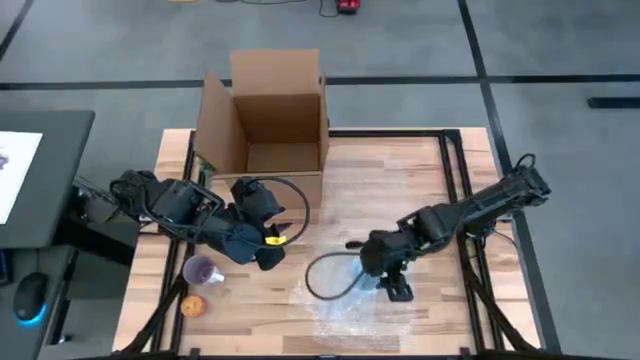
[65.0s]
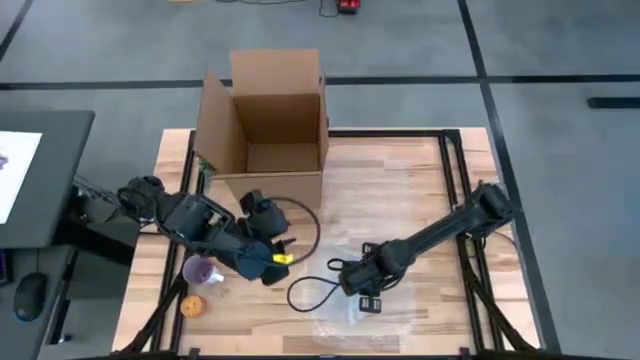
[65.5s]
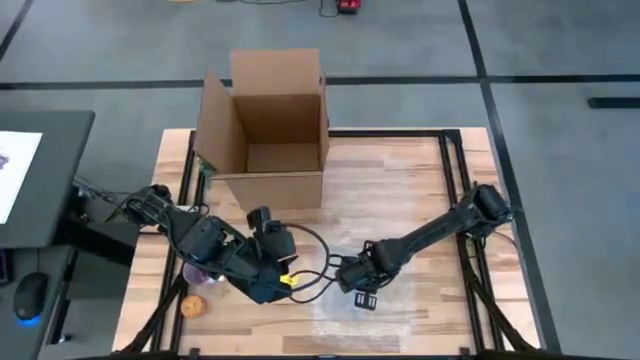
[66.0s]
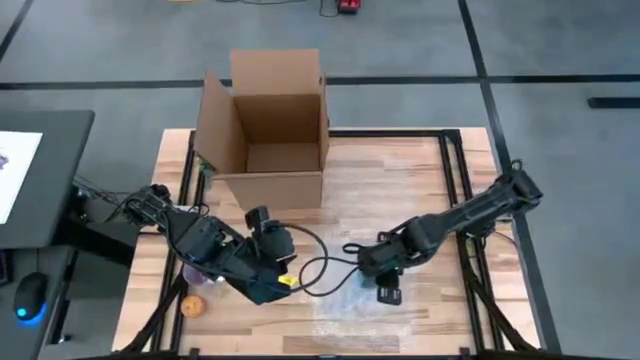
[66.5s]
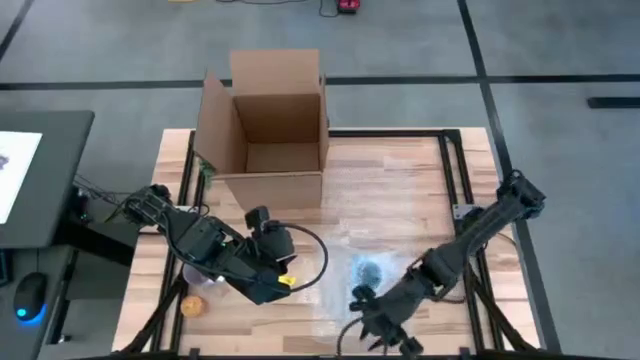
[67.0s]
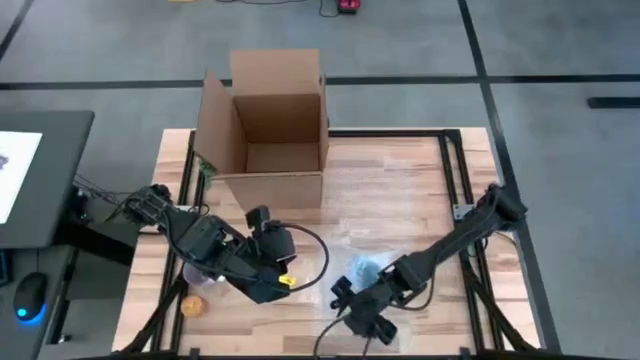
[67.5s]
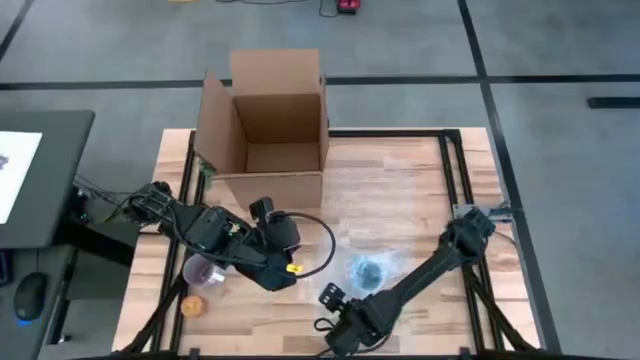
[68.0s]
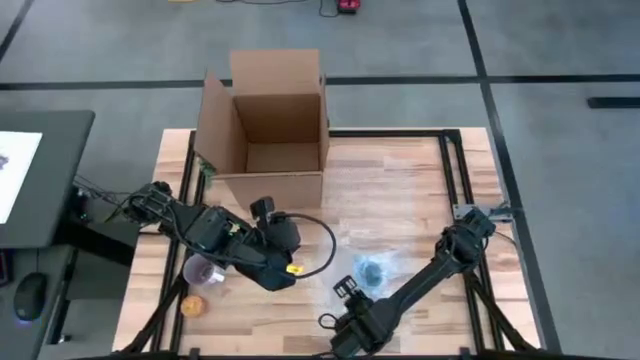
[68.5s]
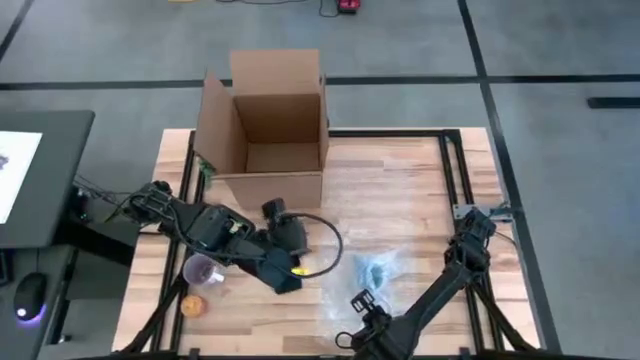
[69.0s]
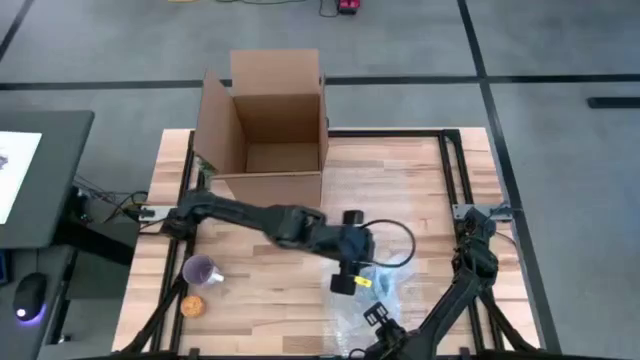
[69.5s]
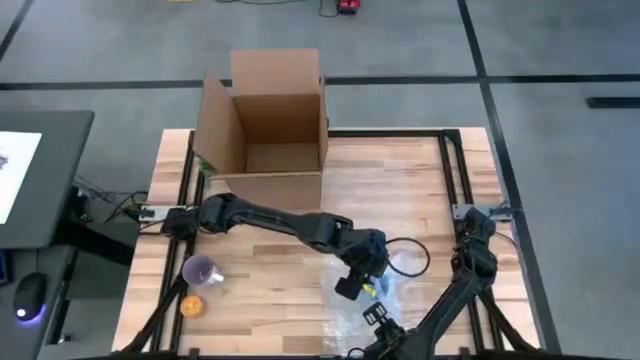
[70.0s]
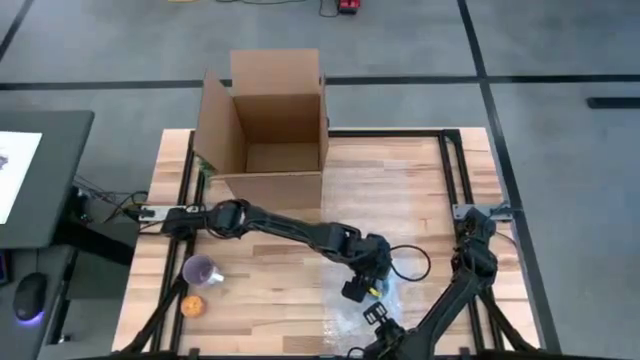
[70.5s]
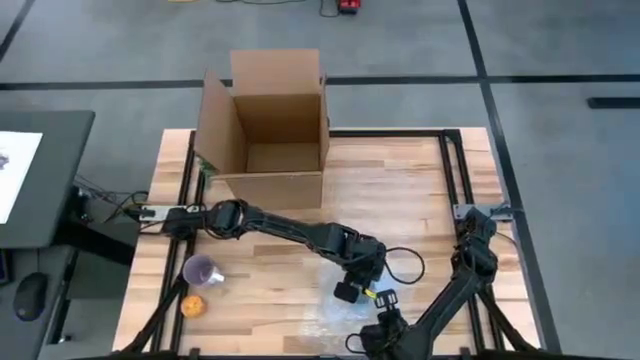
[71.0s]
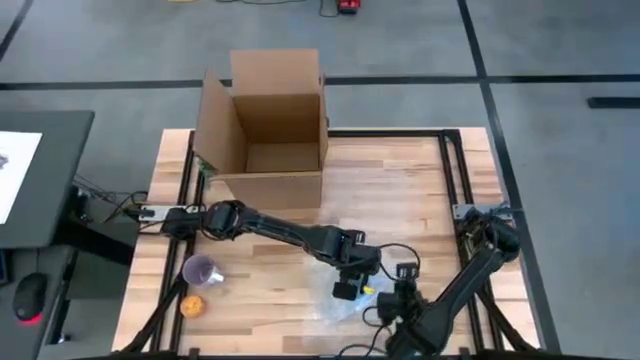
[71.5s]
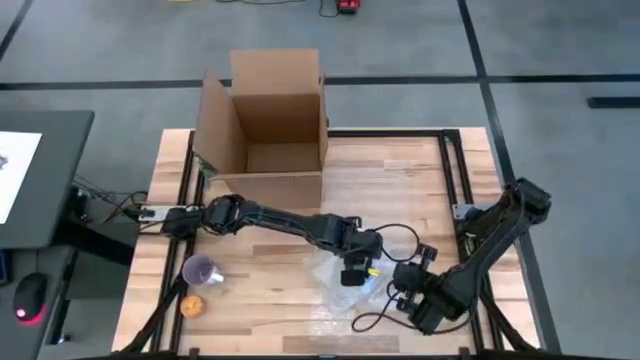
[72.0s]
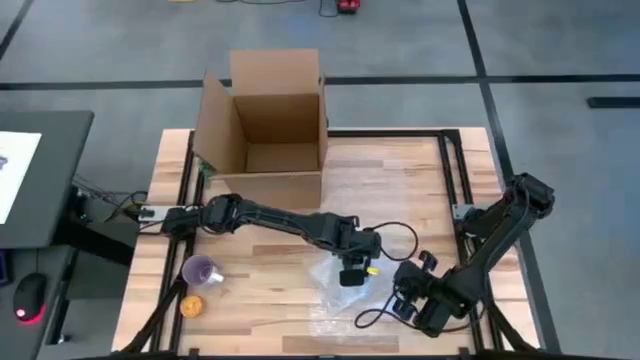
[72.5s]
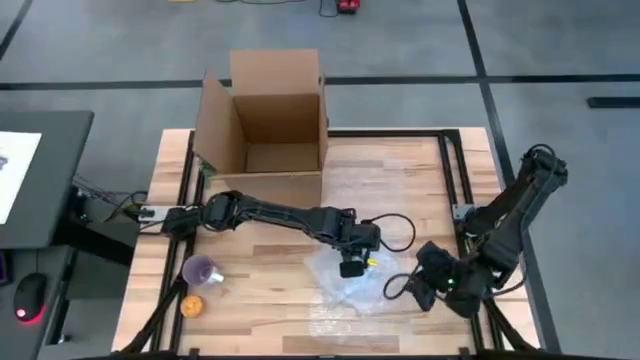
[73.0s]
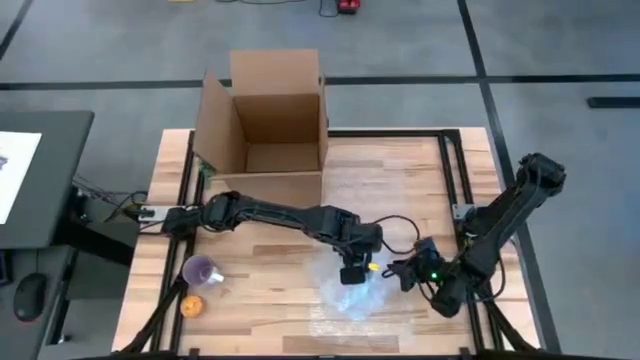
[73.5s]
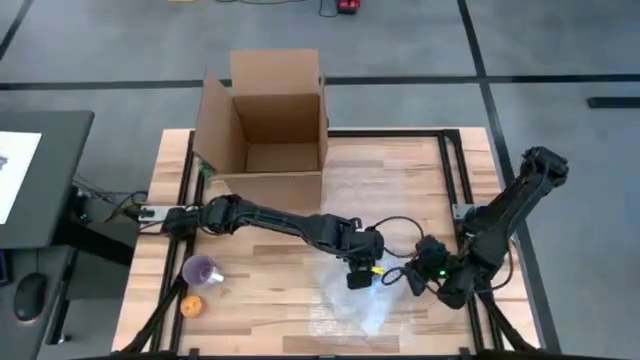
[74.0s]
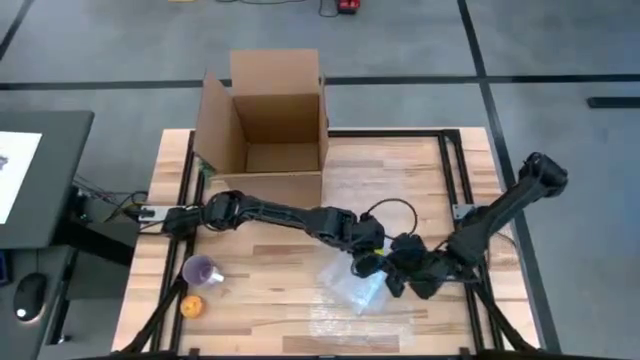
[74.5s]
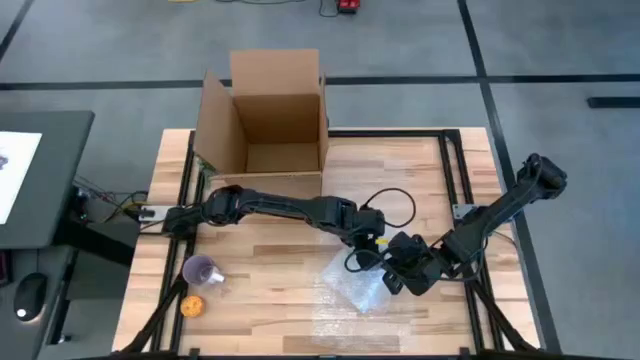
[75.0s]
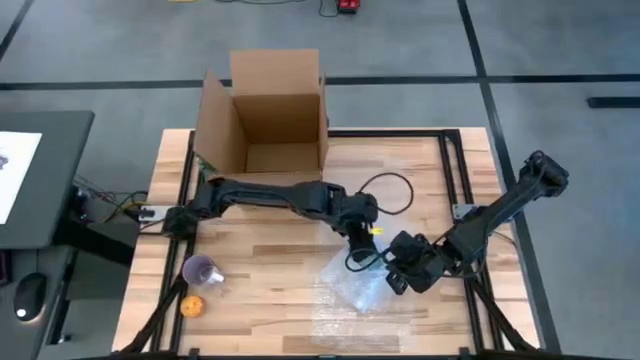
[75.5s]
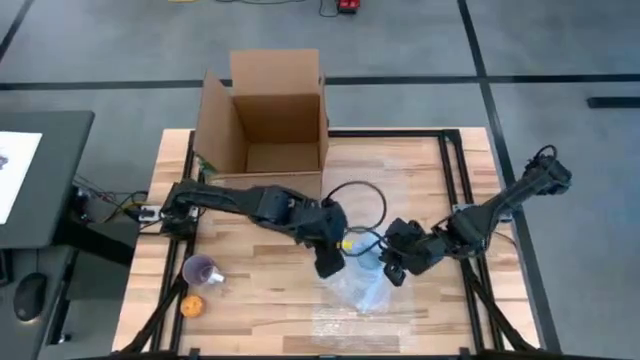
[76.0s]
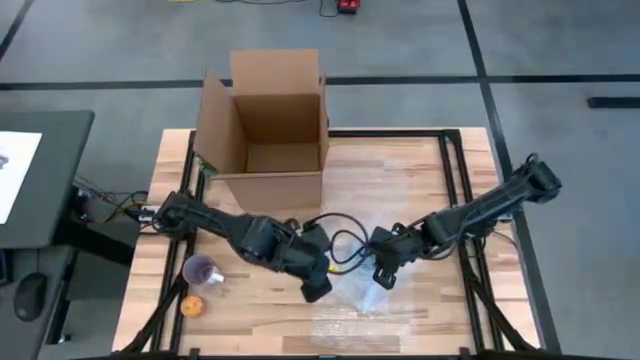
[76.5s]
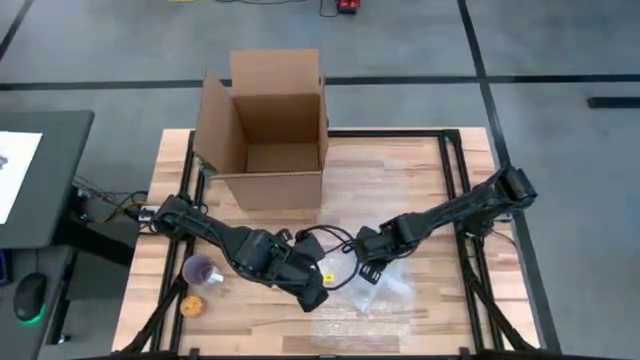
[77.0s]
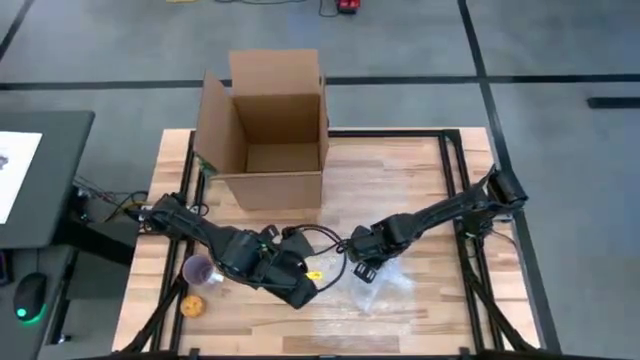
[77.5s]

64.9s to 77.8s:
Task: wrap mug
Wrap the blue mug with the bubble wrap

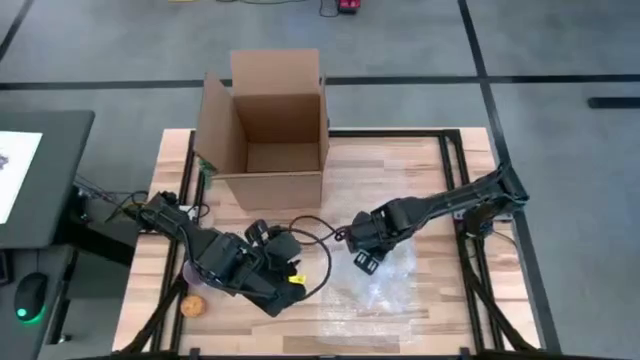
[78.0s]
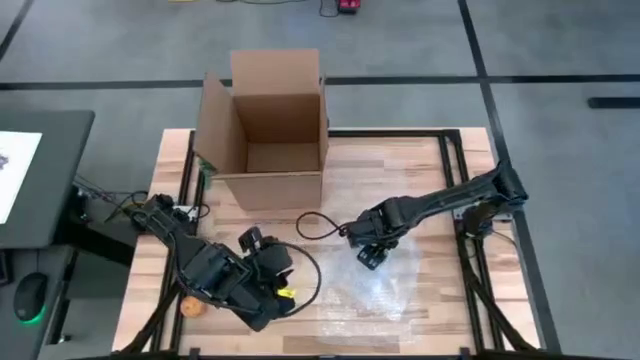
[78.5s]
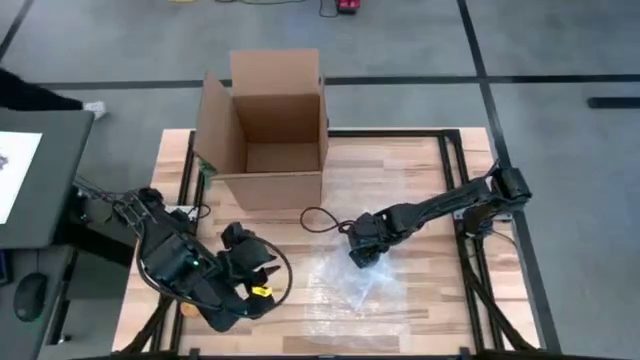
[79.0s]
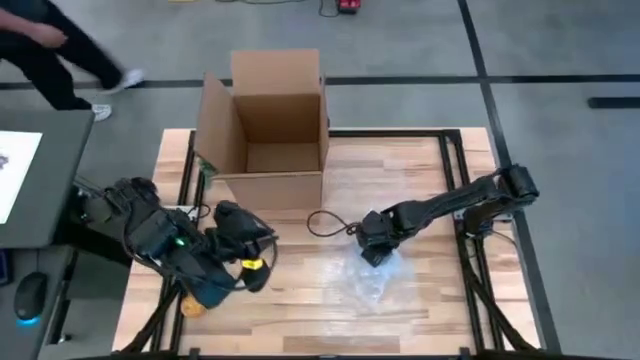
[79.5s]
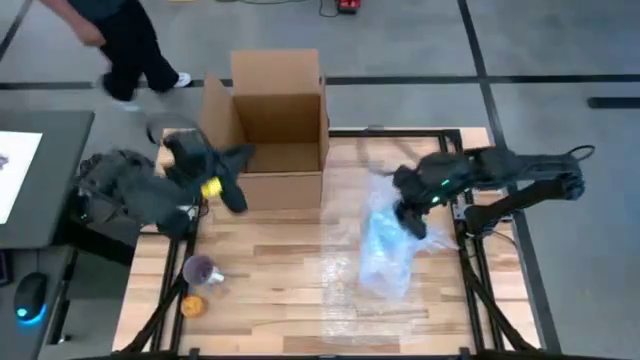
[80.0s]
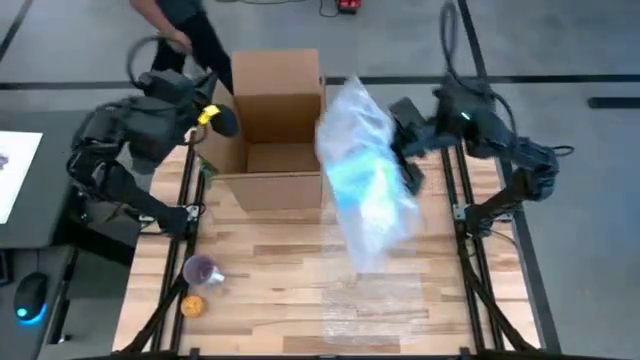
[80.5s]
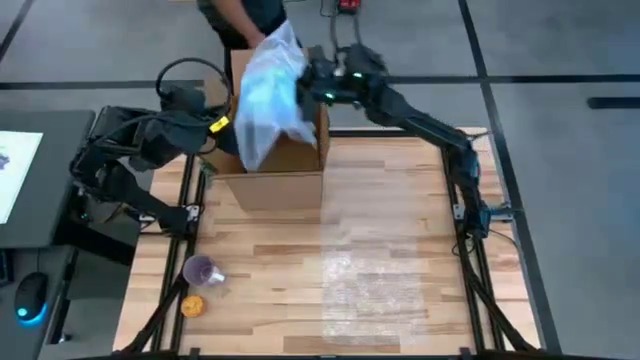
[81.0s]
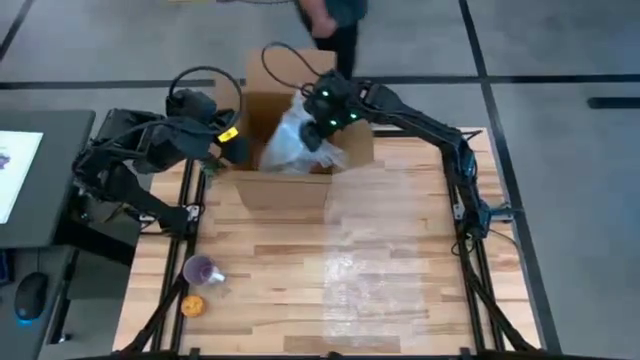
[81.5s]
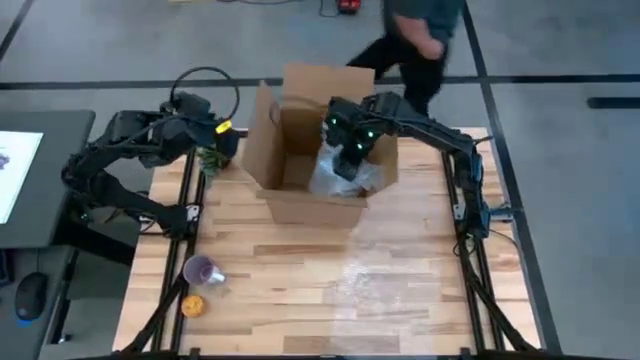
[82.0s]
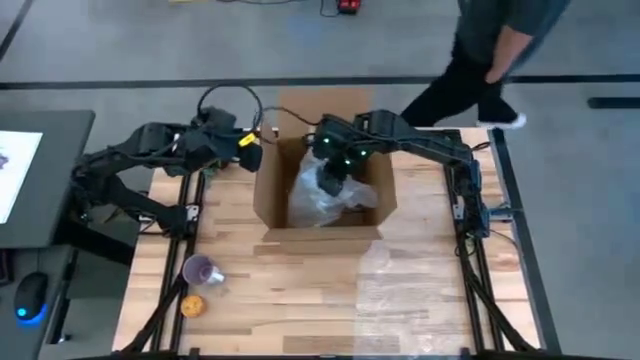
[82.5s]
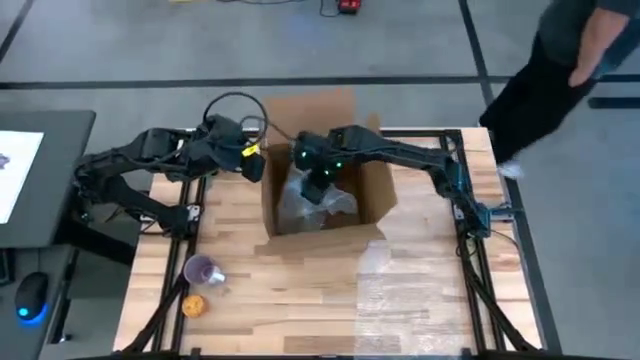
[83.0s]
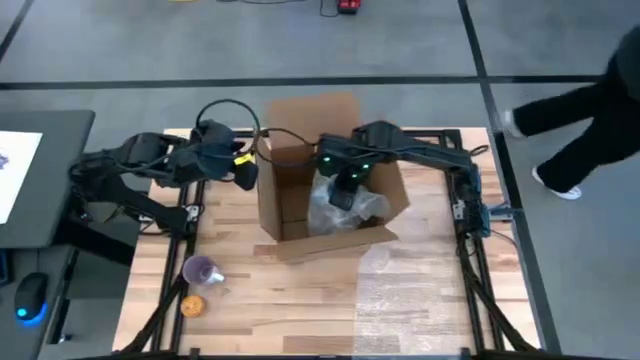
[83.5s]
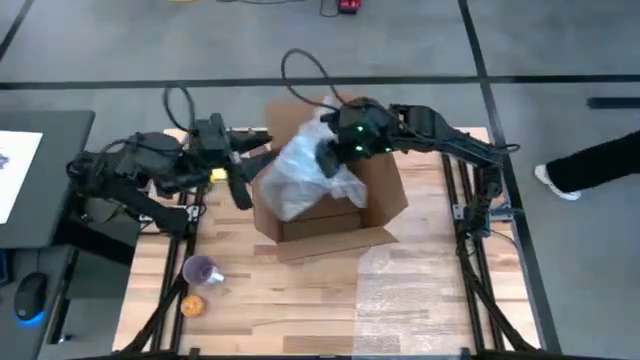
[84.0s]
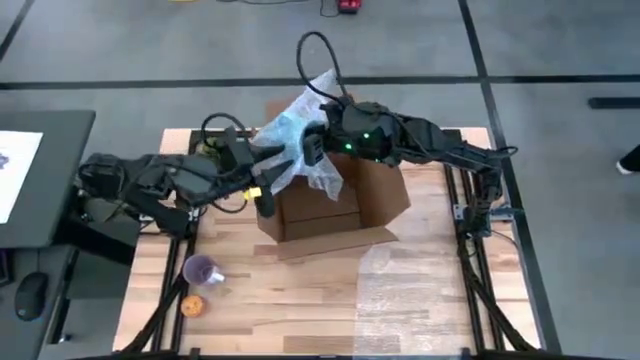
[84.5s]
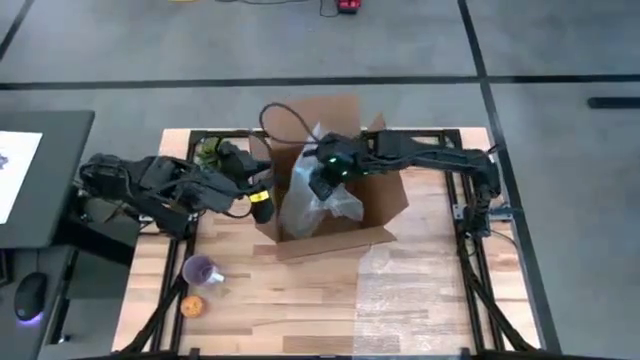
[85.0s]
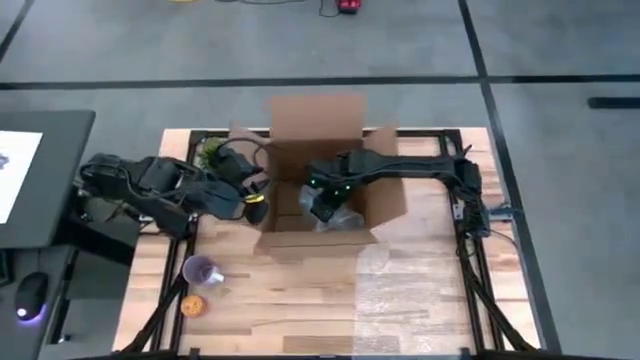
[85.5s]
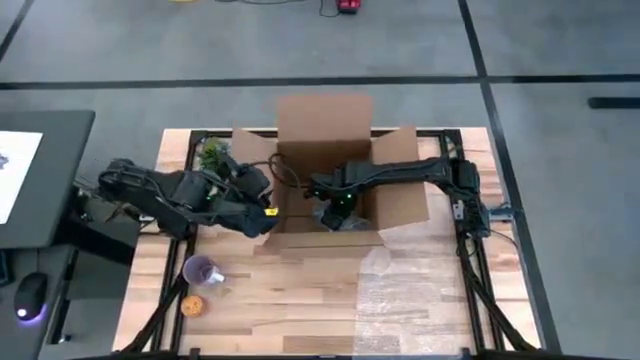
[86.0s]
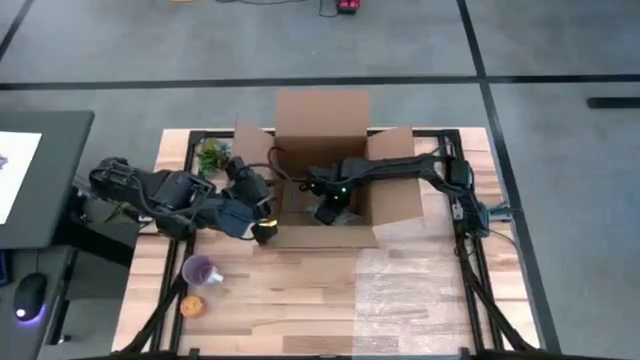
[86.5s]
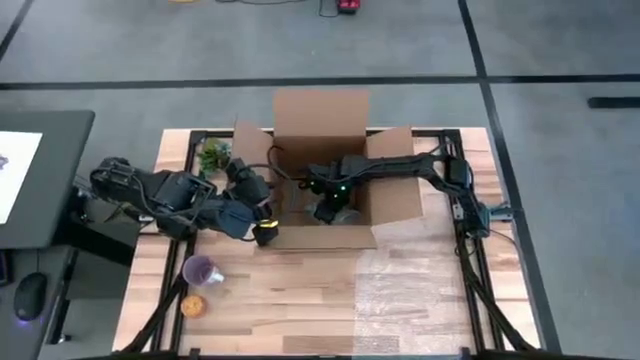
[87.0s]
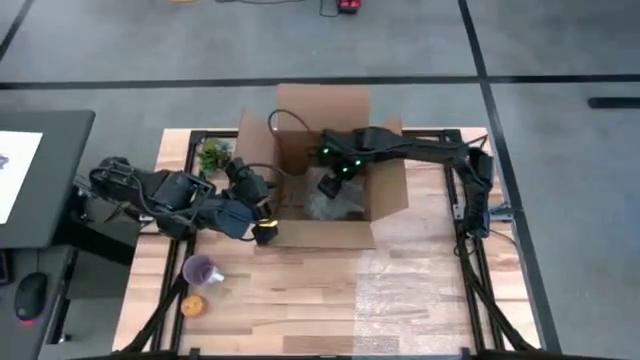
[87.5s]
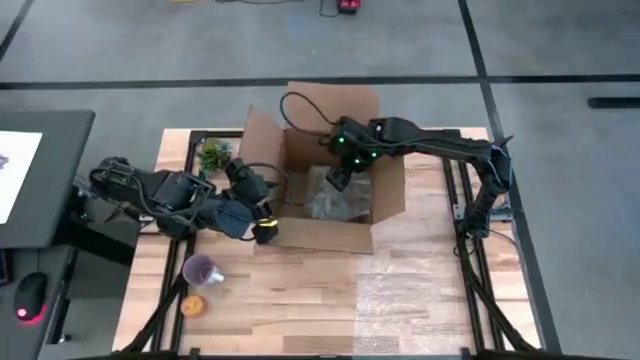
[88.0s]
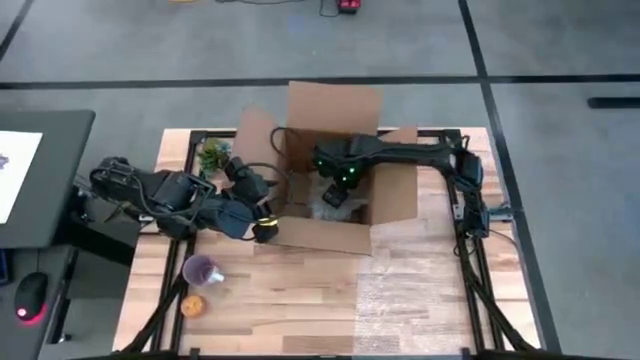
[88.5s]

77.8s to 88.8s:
Put the wrapped blue mug into the box
